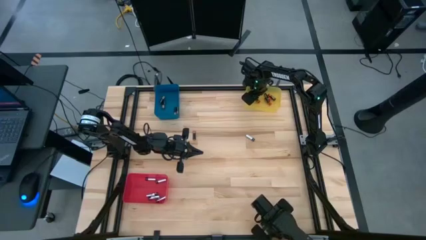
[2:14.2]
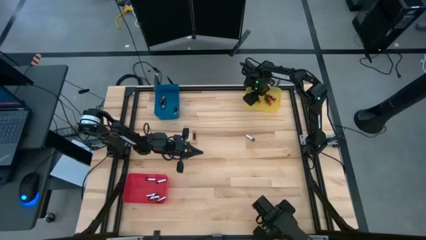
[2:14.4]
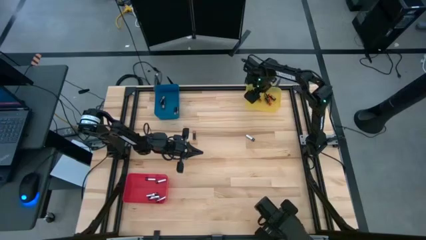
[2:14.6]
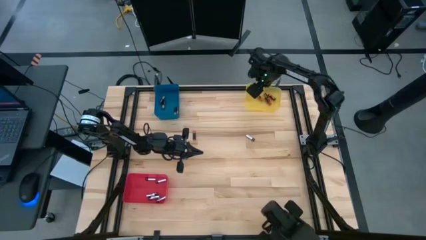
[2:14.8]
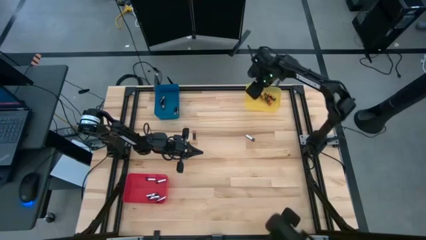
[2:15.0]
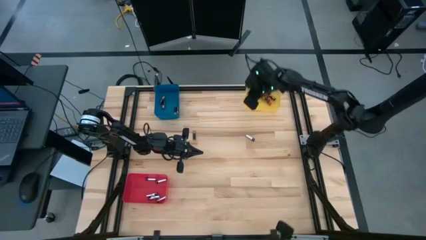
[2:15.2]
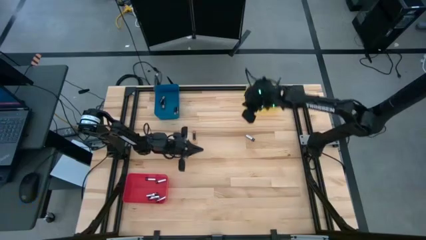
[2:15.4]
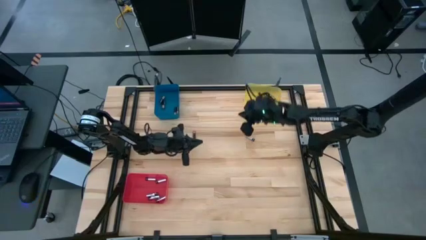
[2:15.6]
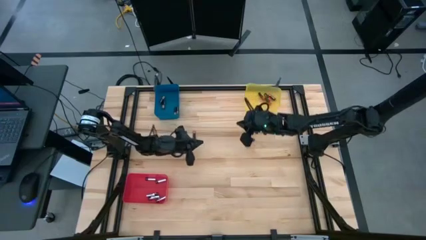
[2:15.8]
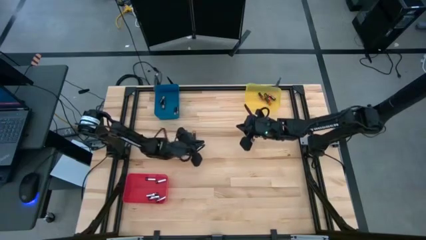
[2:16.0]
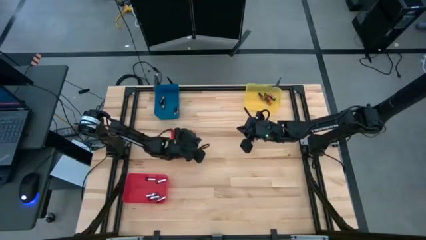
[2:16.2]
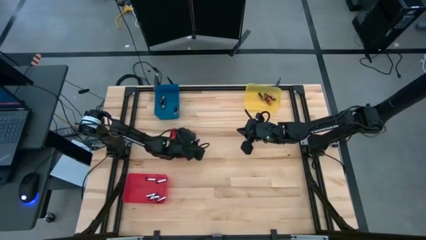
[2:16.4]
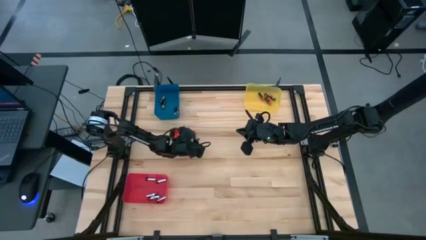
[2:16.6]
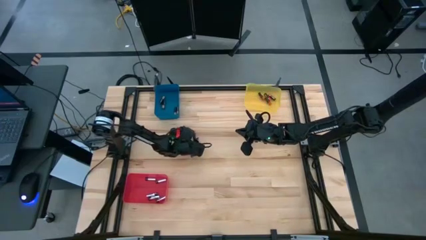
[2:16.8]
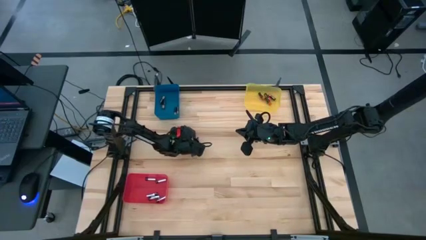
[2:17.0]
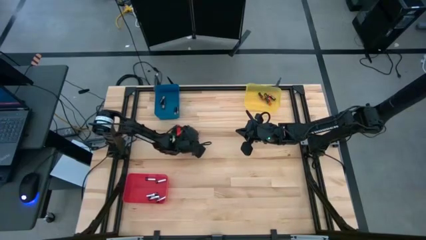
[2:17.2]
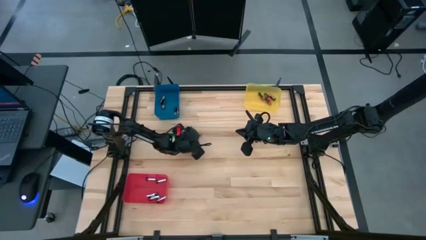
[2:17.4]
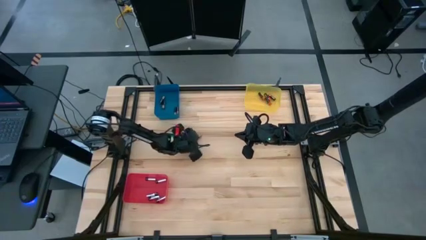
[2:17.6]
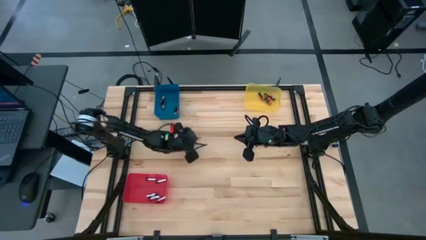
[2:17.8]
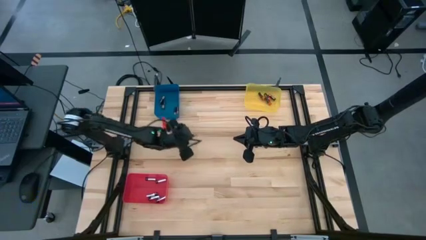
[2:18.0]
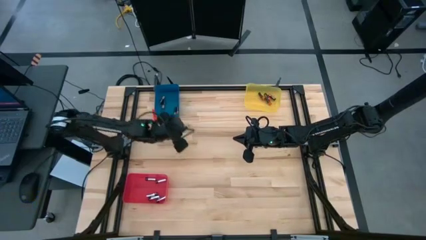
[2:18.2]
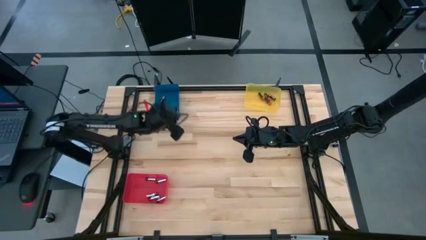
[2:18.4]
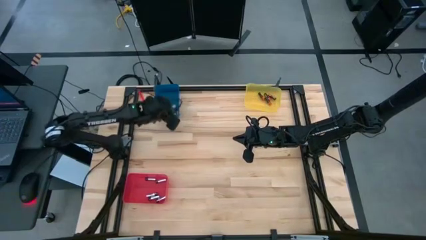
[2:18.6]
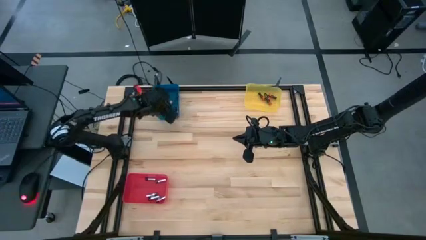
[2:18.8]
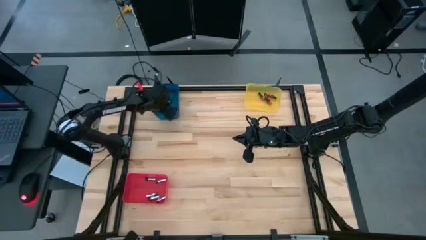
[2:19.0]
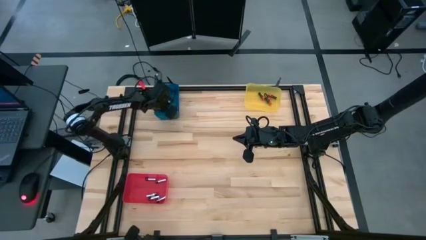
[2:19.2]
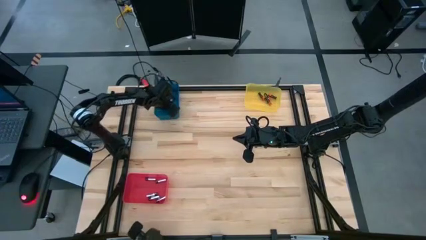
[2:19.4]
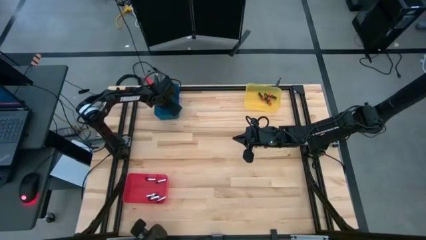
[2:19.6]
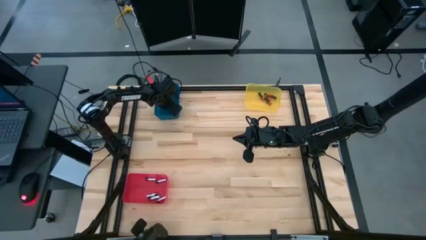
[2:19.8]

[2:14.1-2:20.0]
Task: Sort batteries
Put the black battery into the blue bin

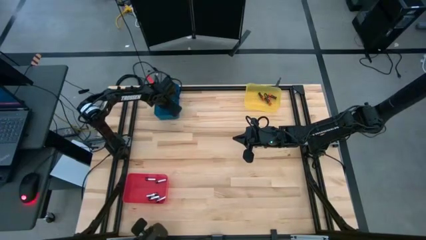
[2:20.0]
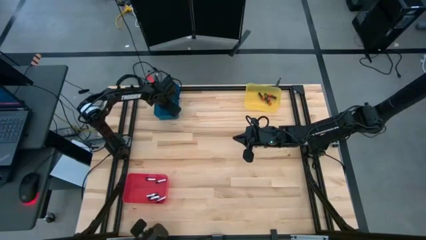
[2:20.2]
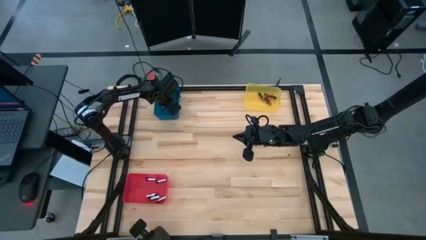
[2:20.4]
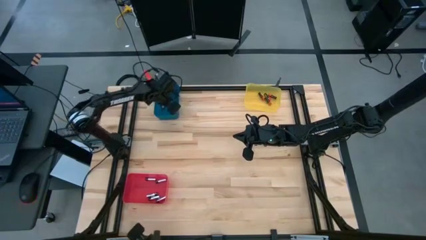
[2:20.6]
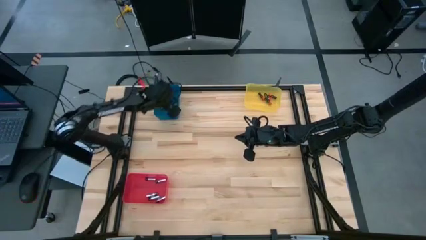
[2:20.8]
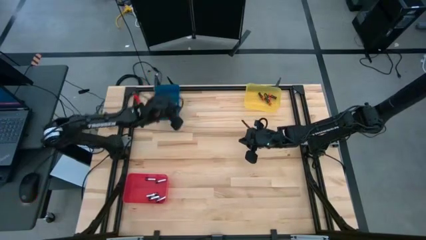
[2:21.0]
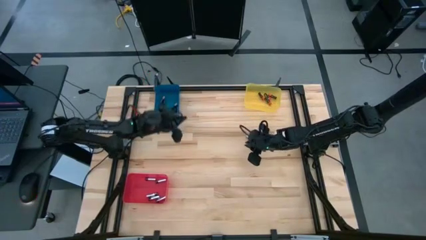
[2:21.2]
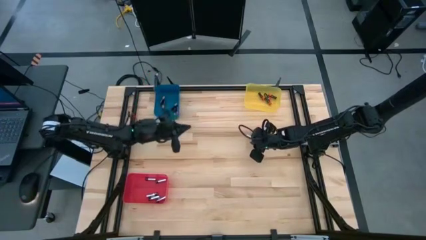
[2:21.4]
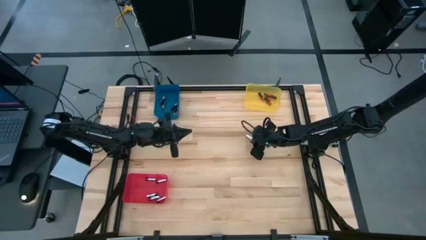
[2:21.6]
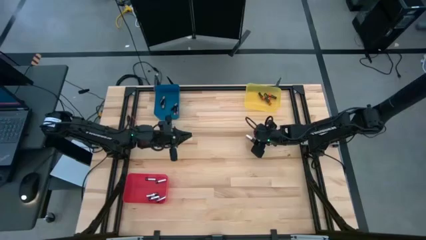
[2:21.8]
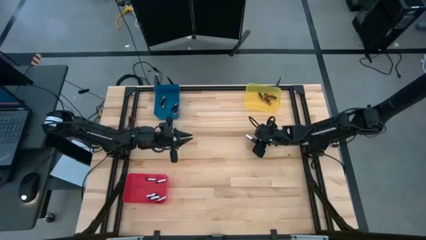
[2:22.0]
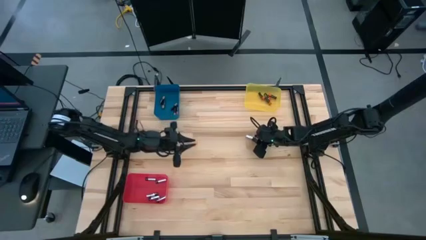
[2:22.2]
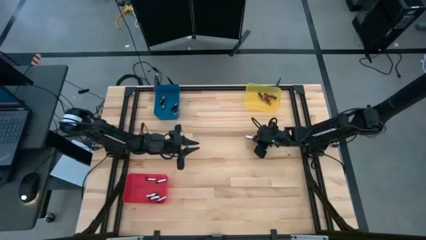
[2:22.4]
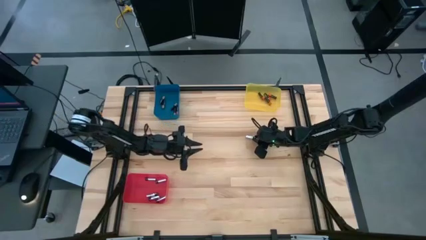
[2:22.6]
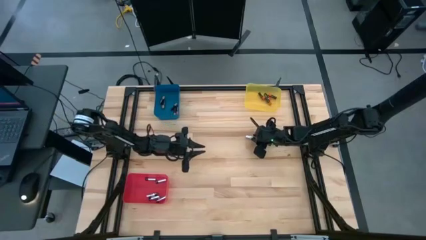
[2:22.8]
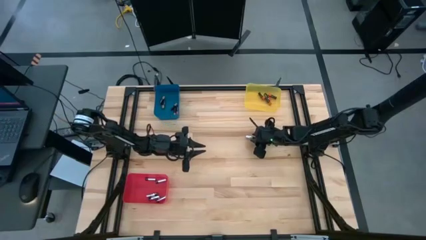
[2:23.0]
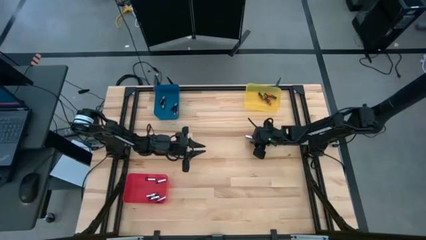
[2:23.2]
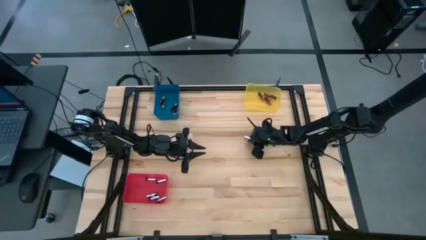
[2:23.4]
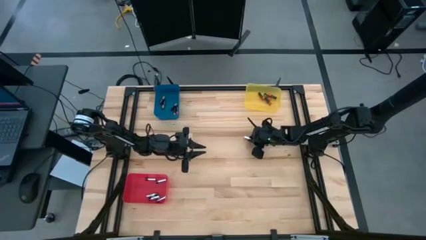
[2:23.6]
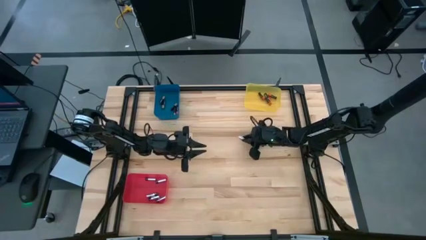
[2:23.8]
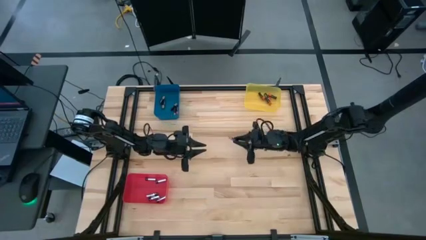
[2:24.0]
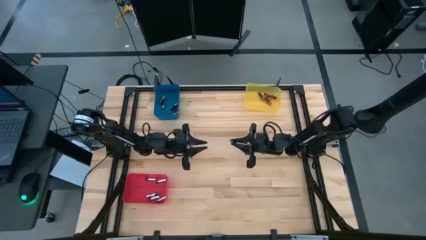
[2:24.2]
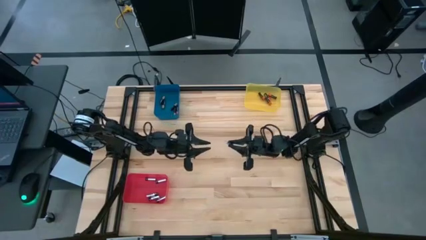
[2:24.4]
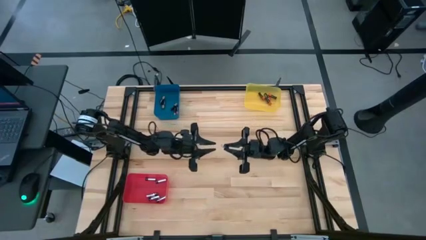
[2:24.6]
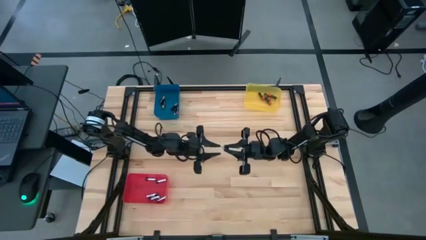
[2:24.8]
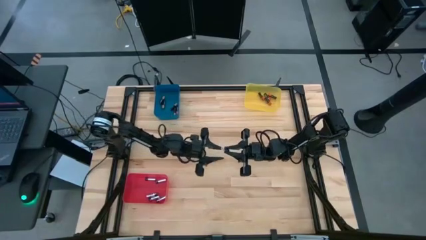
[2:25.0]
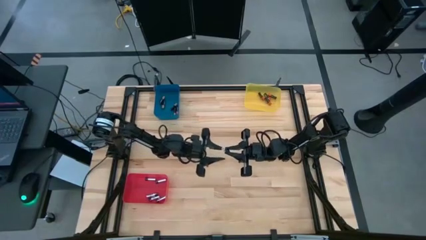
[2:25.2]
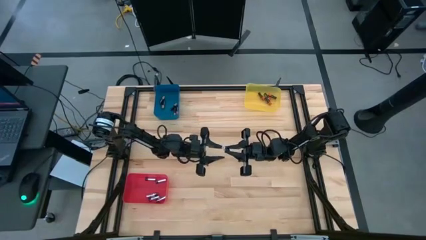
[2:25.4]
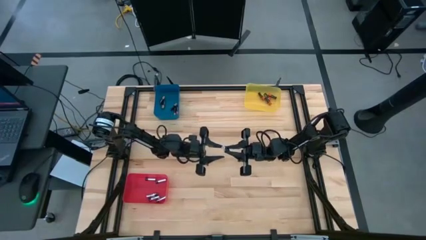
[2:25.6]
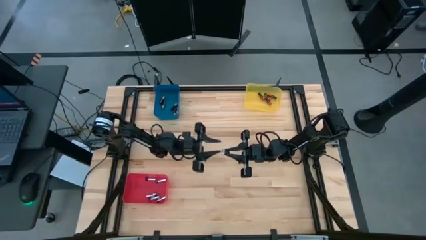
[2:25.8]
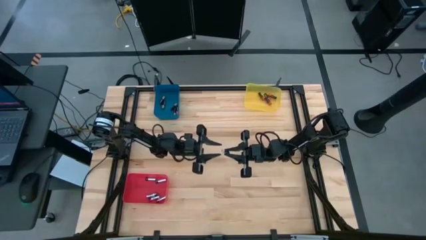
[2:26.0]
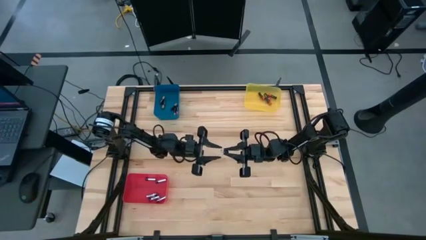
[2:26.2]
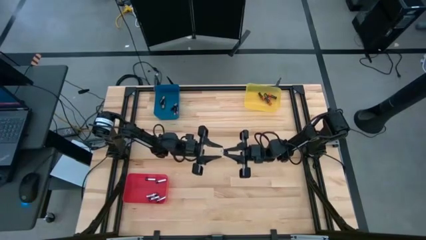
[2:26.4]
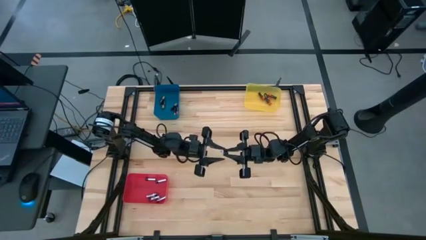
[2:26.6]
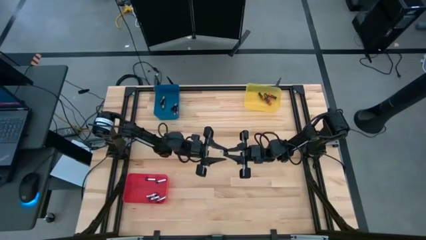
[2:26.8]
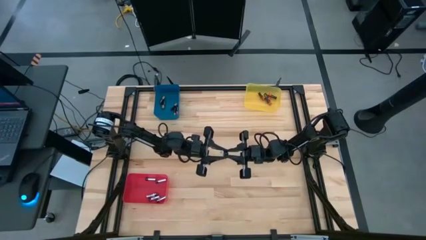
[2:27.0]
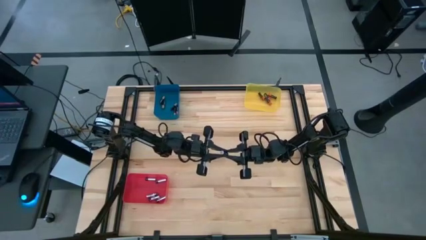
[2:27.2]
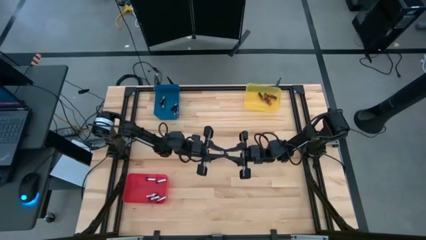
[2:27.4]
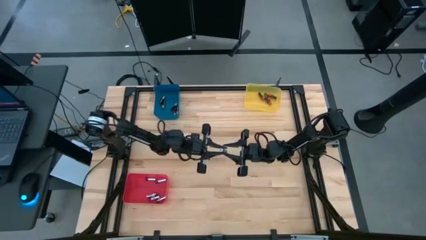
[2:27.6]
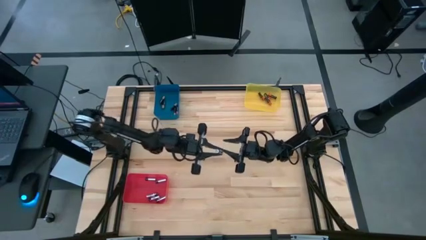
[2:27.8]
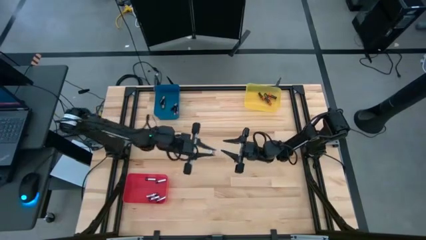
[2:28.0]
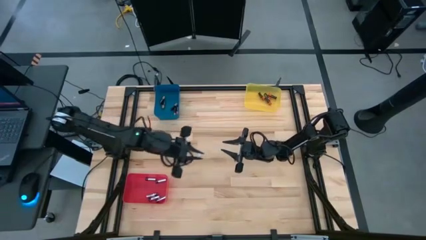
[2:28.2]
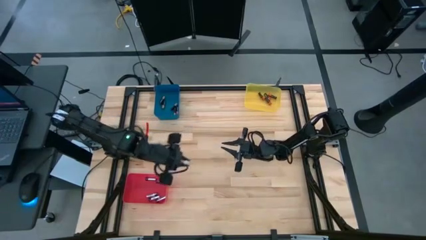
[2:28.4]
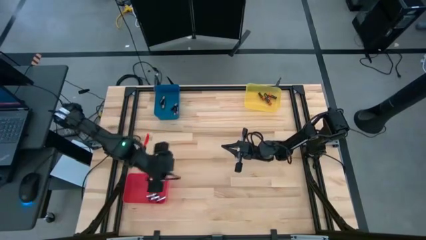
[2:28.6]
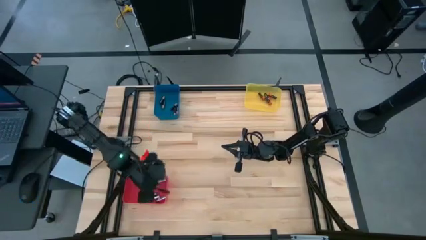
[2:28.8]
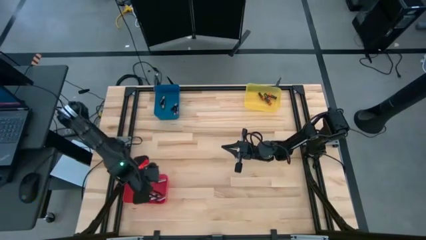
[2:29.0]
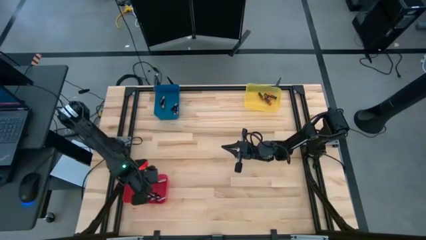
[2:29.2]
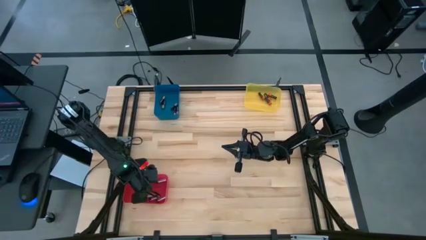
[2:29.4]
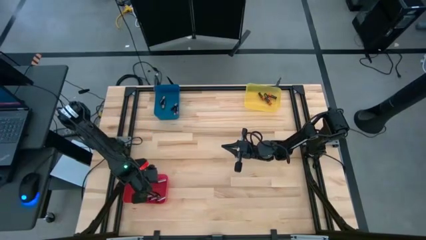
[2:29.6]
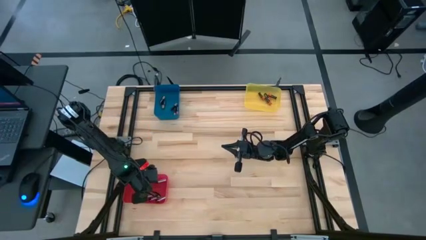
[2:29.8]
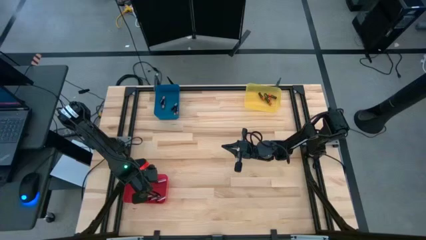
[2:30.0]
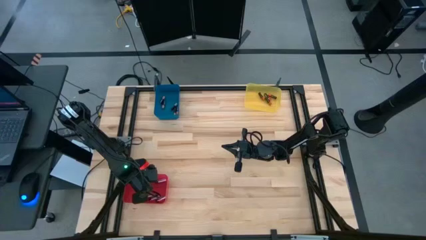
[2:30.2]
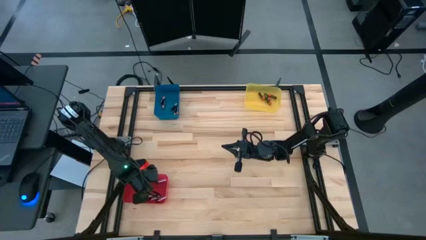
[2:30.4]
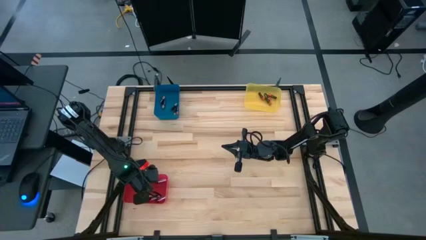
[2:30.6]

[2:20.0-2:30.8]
Put the silver battery into the red bin
